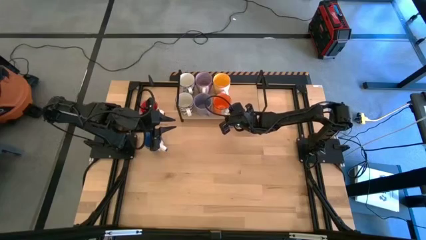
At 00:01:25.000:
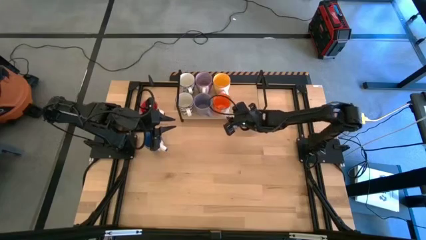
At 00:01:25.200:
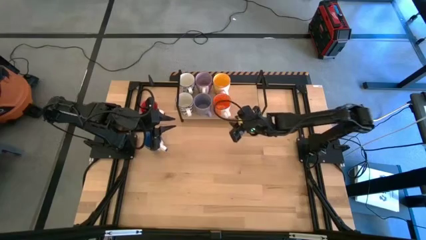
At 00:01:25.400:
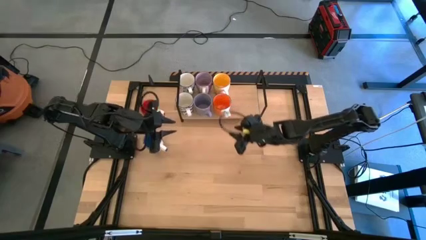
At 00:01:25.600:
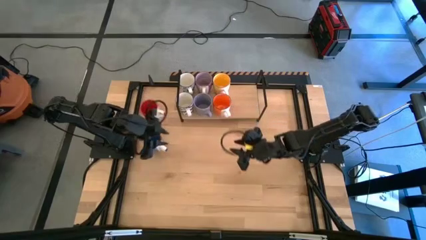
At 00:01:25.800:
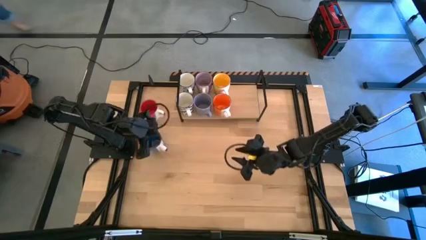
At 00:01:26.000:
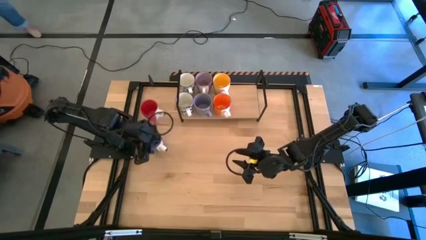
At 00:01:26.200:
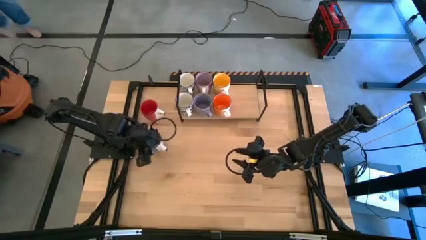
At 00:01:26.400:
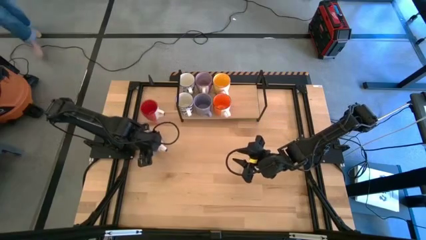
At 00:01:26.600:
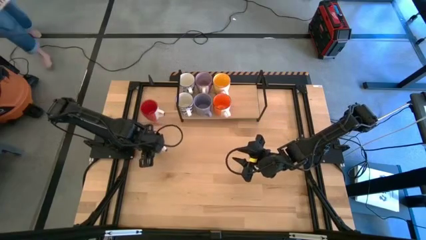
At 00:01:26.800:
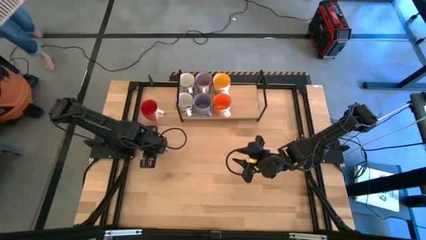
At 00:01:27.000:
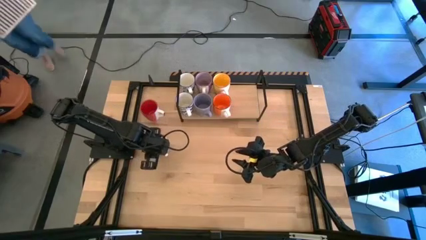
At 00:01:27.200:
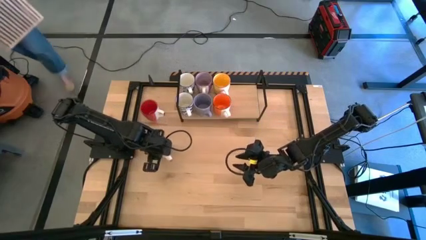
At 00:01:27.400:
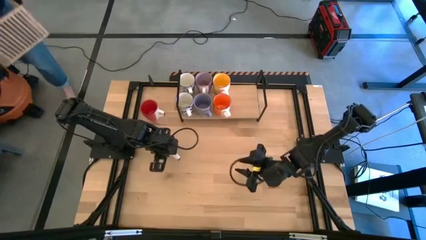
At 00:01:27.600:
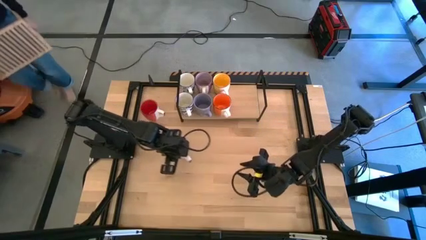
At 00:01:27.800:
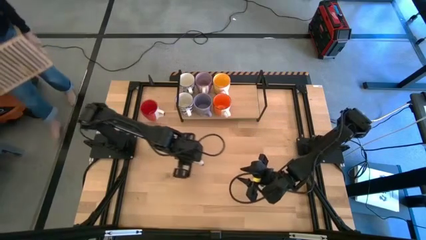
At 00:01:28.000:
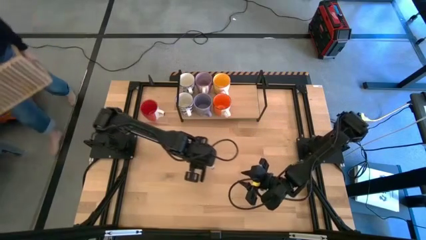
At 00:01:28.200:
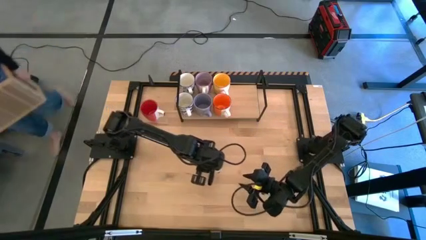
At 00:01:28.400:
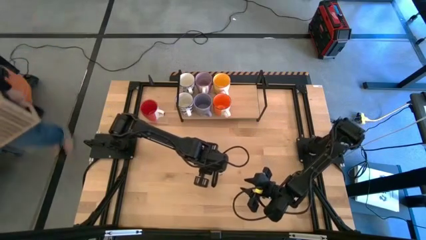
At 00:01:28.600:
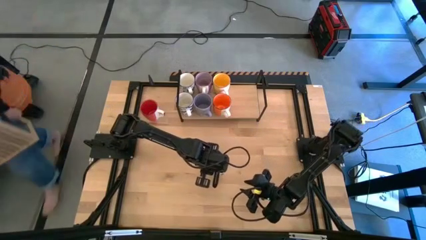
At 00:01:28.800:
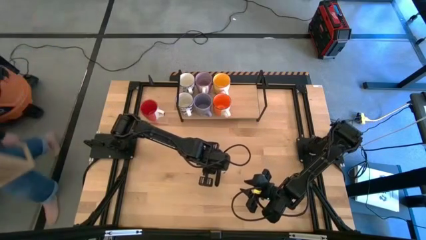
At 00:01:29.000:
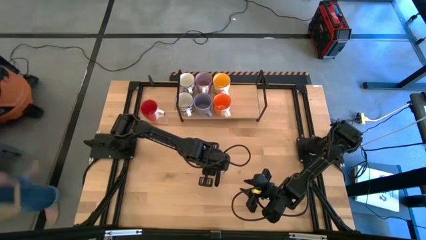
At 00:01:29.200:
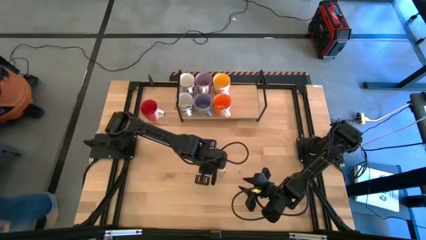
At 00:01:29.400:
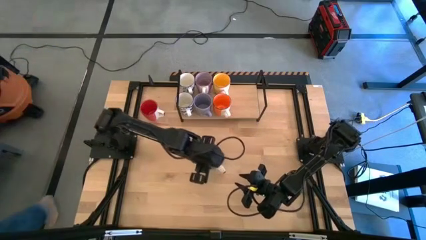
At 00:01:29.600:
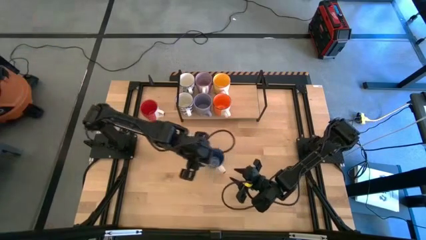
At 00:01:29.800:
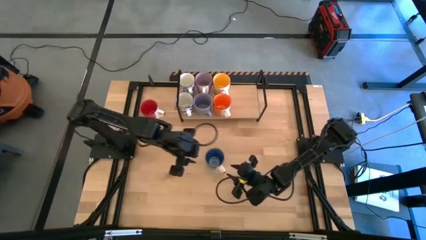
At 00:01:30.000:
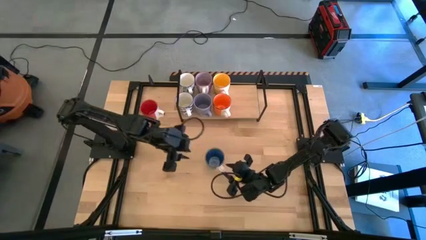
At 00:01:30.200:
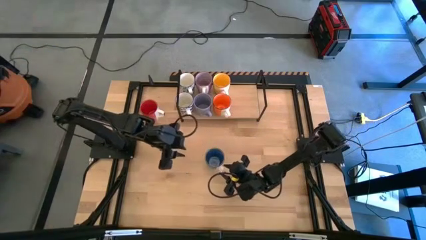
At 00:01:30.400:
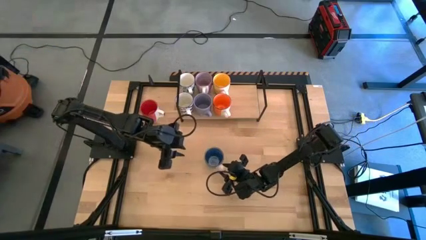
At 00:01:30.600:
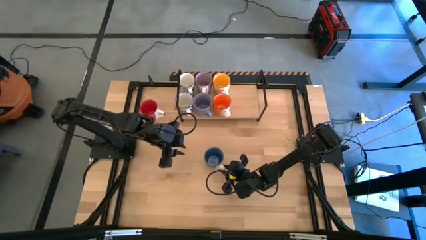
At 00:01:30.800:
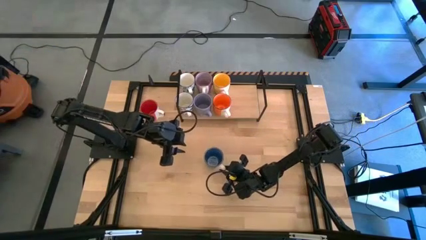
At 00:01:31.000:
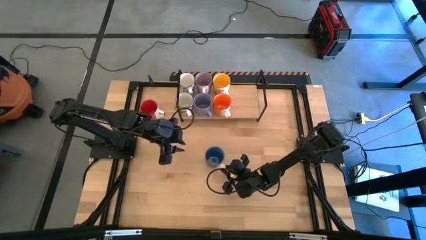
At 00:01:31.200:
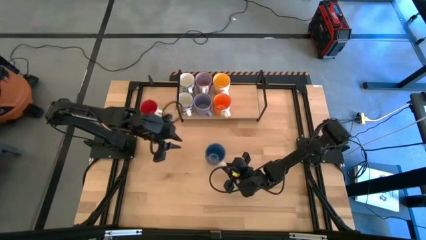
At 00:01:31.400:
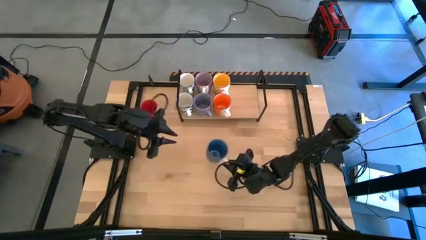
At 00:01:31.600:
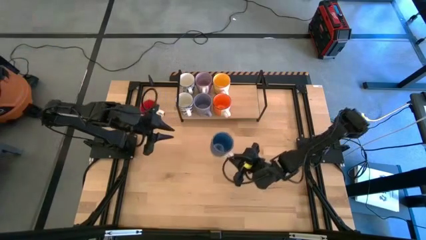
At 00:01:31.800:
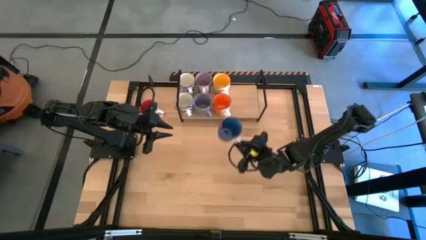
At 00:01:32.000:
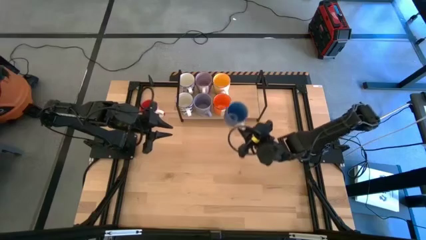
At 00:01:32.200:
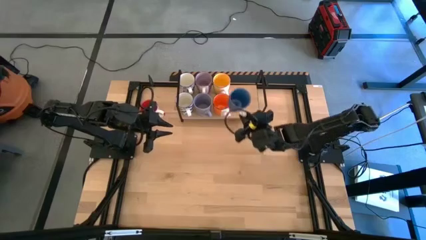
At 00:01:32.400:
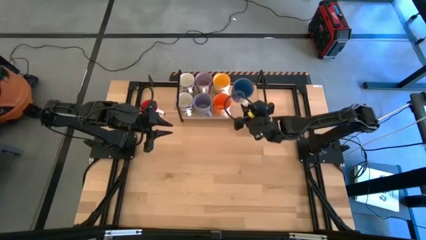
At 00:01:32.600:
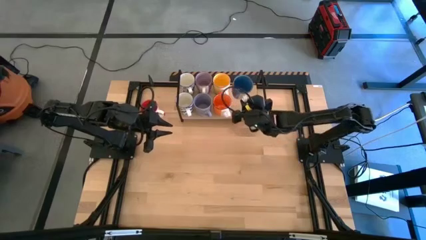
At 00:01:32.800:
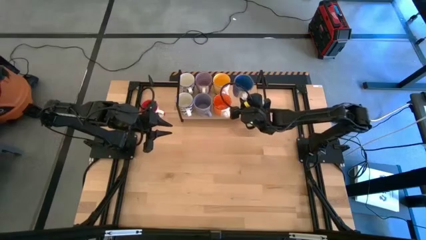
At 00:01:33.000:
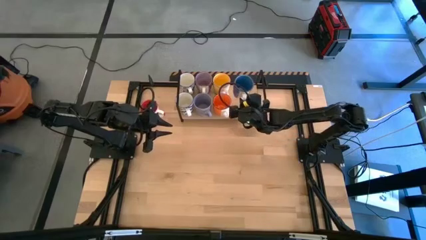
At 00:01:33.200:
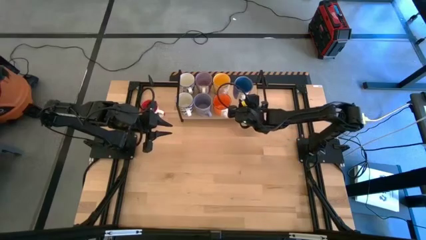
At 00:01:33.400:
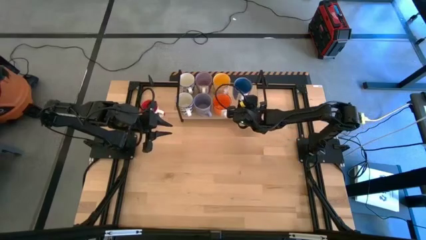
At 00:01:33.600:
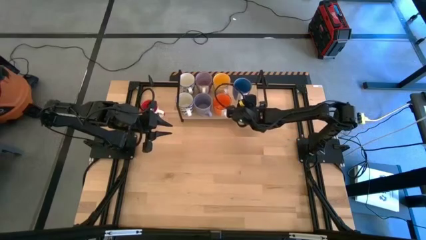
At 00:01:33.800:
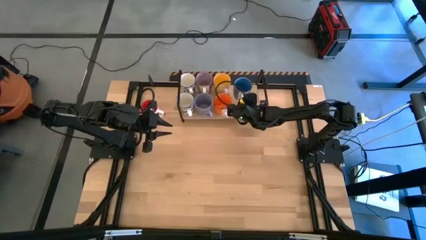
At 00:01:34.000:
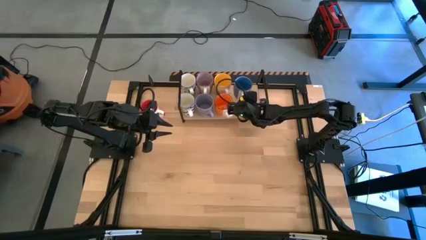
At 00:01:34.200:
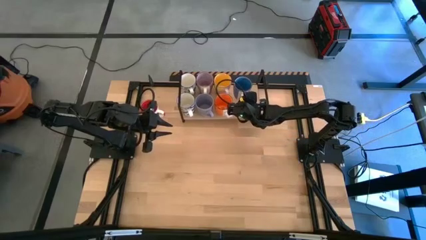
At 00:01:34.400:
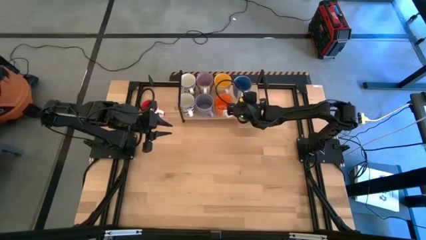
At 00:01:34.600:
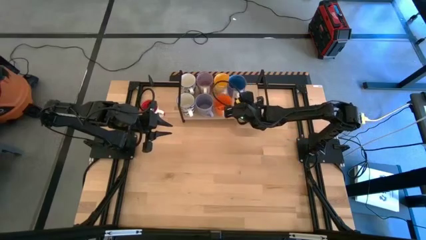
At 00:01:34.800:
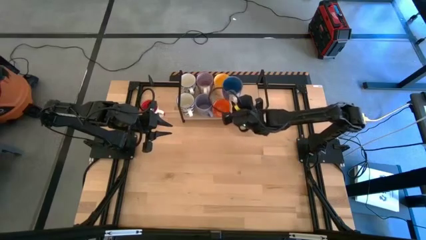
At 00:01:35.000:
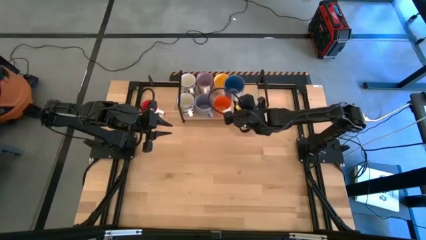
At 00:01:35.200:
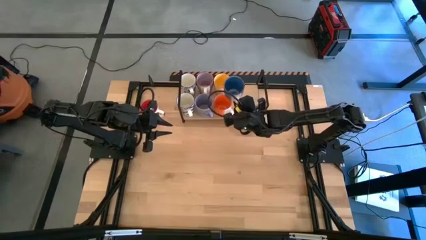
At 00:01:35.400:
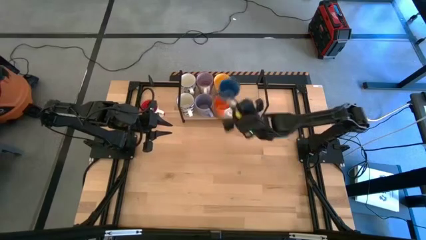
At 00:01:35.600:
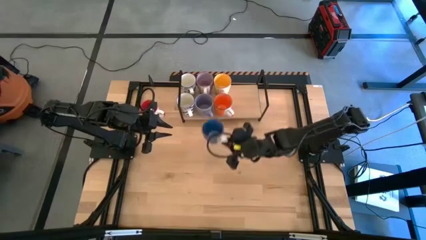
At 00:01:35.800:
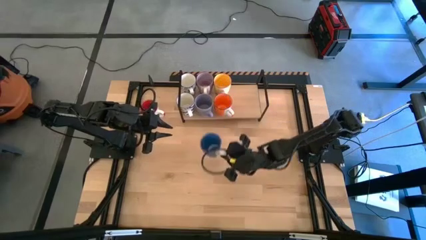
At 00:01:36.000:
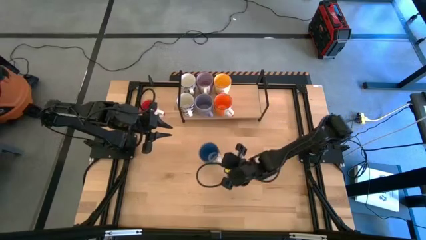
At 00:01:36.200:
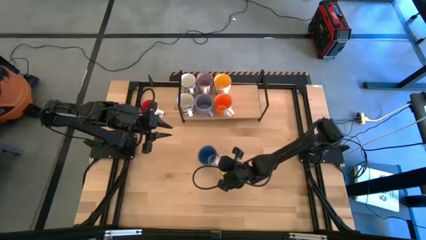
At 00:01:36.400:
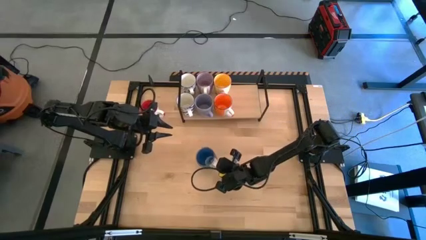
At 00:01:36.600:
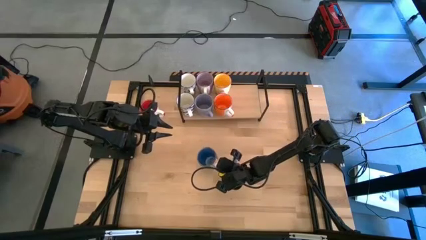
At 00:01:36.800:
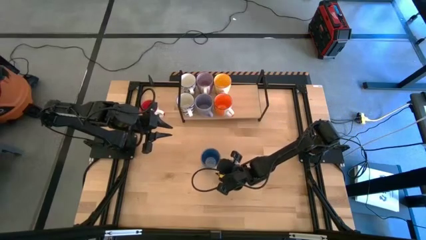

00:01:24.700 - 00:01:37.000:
Task: Place coffee mugs
Put the blue mug on the shelf

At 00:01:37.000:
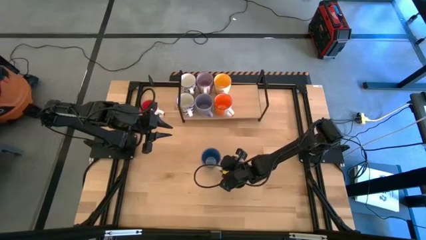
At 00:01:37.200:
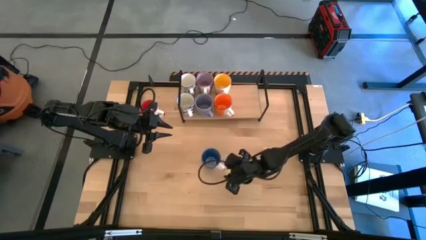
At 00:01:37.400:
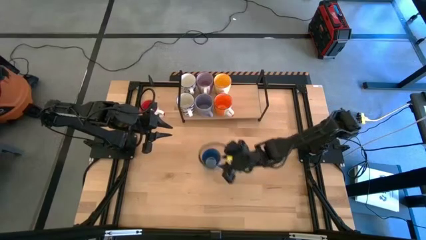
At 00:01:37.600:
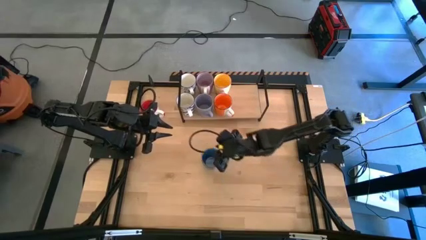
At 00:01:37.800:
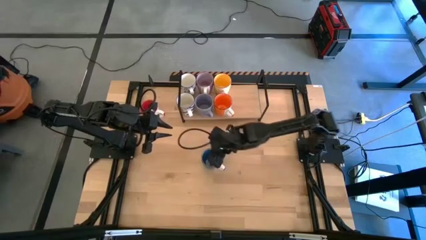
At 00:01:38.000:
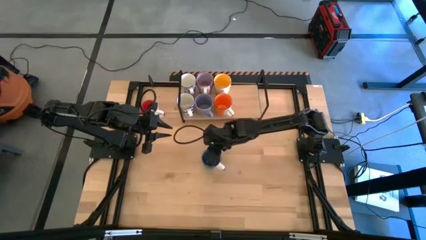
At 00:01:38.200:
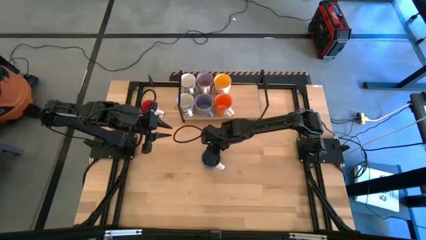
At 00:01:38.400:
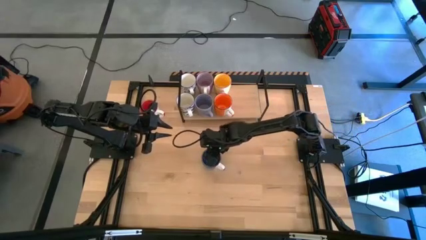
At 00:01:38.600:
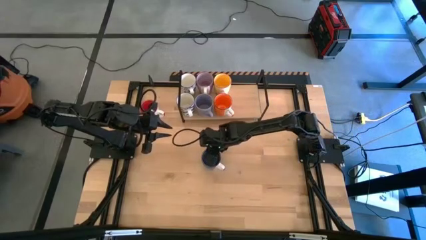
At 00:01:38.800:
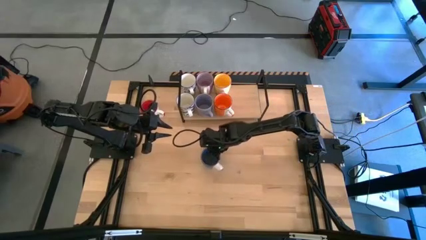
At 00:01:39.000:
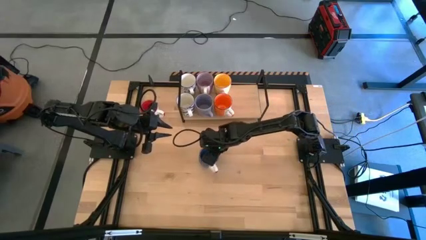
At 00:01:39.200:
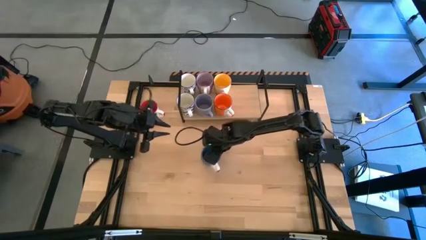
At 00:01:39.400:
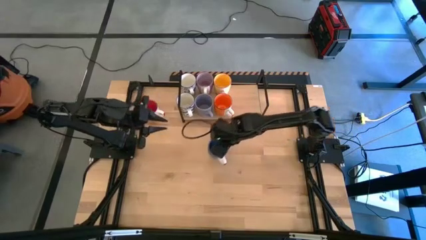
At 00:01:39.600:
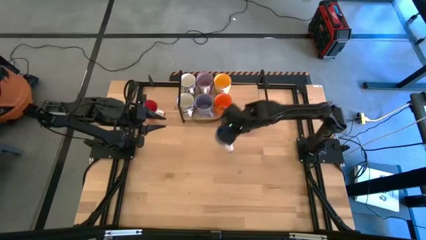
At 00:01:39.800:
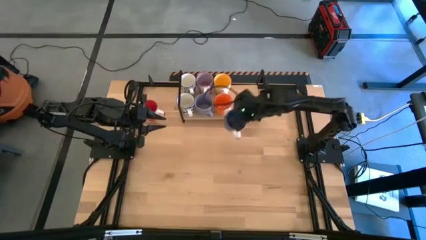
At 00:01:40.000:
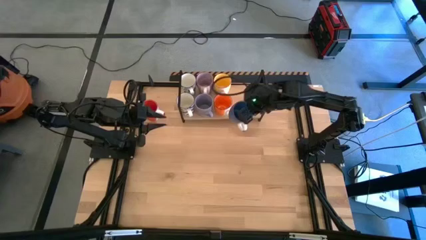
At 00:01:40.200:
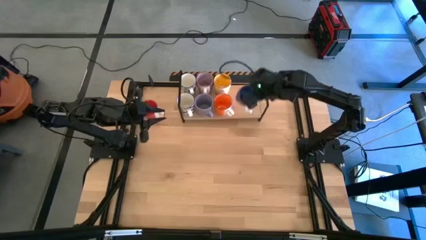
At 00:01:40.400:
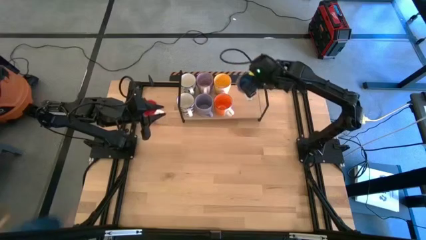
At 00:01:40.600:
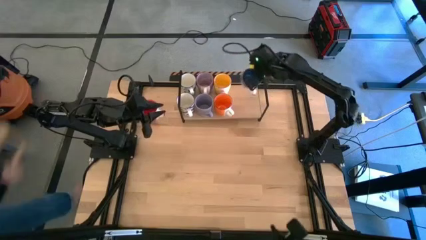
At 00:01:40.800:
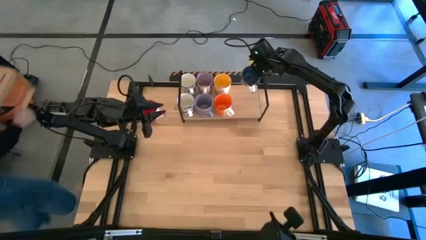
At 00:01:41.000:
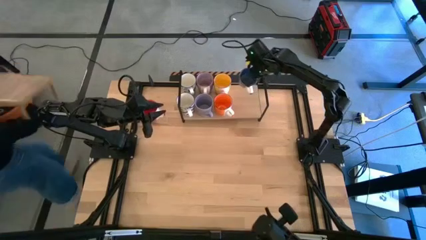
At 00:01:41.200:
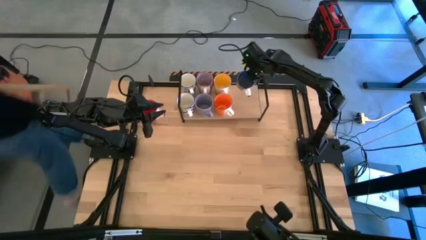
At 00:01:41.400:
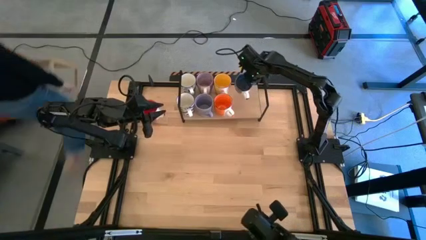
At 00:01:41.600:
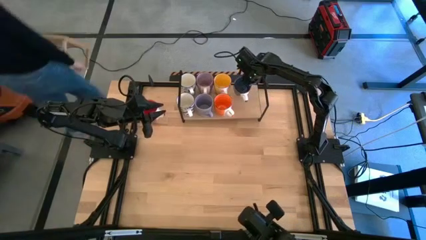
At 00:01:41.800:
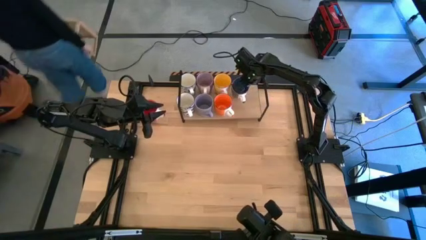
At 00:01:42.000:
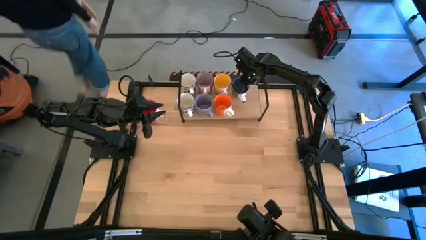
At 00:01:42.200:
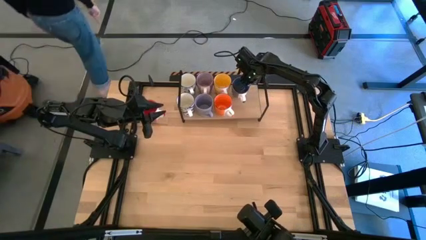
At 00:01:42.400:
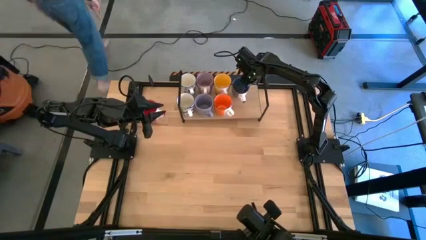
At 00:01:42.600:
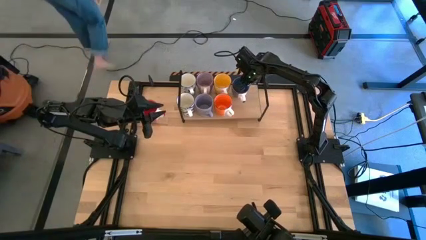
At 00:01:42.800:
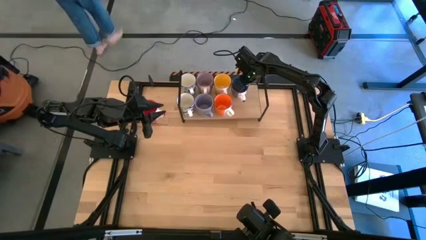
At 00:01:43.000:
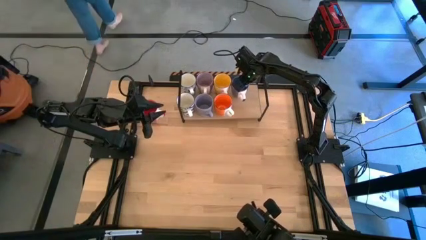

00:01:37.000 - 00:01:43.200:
Put the blue mug on the shelf
